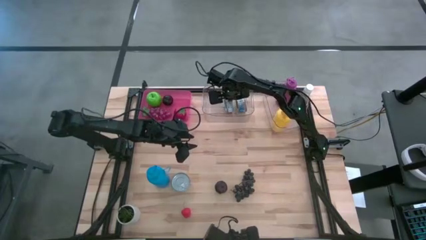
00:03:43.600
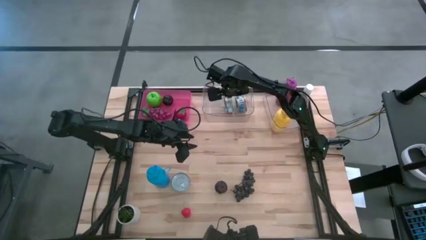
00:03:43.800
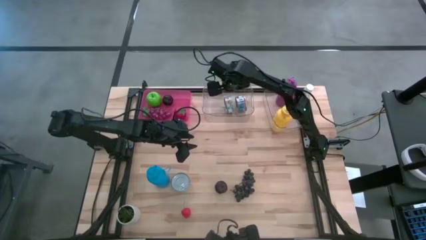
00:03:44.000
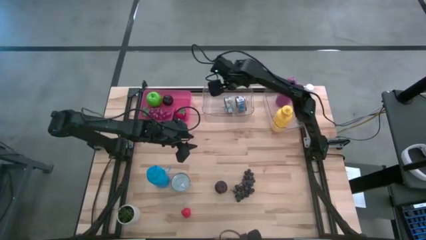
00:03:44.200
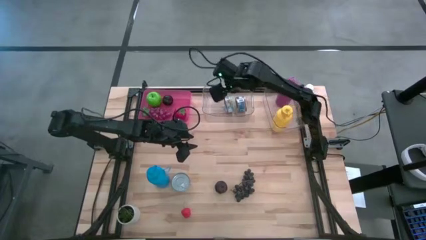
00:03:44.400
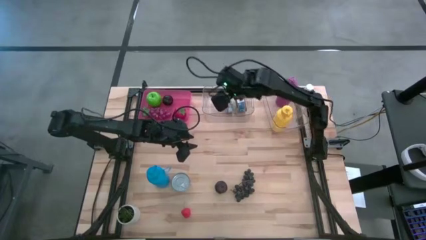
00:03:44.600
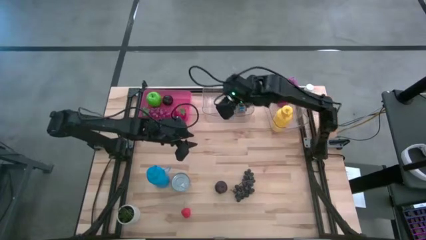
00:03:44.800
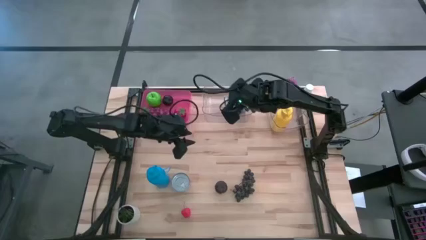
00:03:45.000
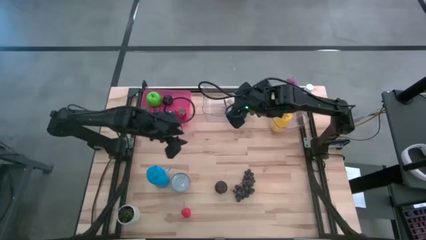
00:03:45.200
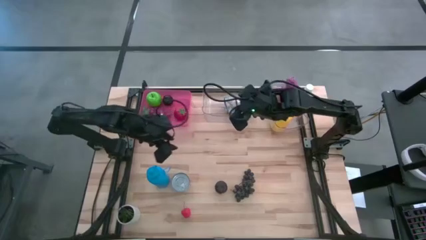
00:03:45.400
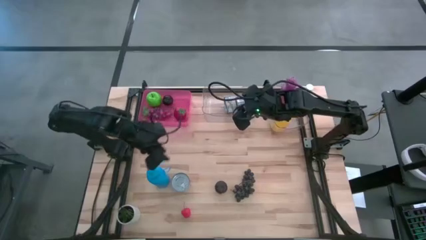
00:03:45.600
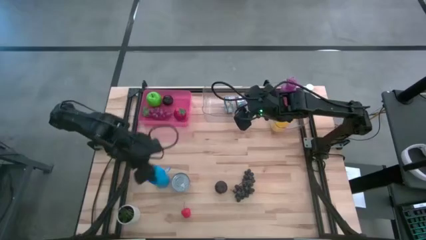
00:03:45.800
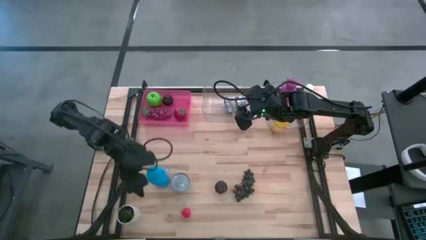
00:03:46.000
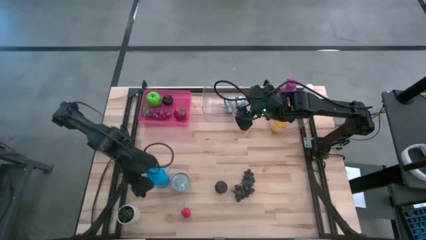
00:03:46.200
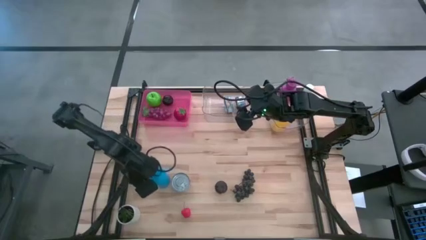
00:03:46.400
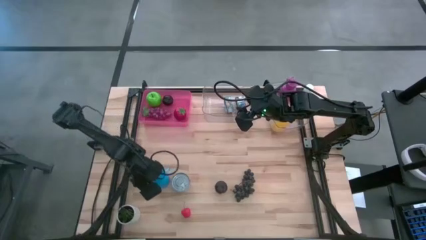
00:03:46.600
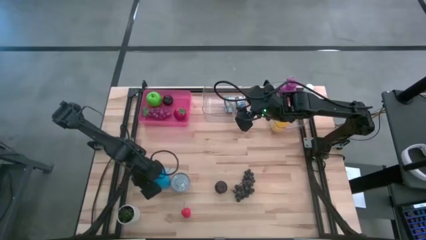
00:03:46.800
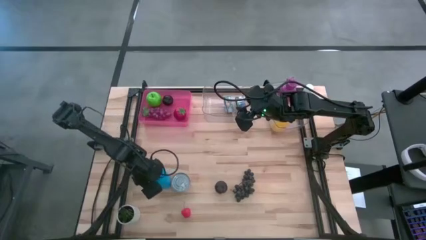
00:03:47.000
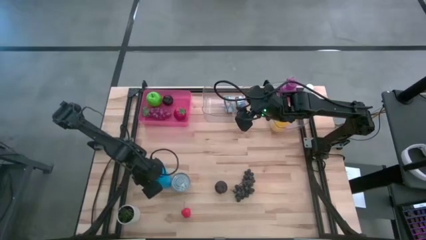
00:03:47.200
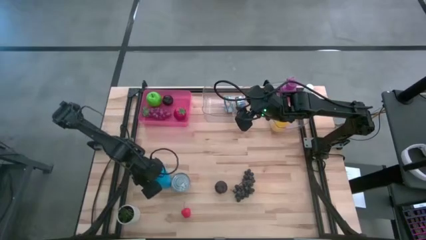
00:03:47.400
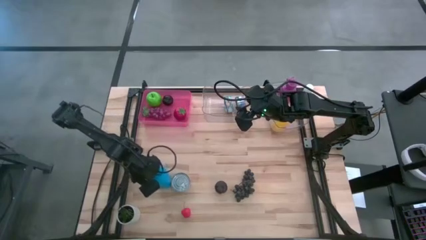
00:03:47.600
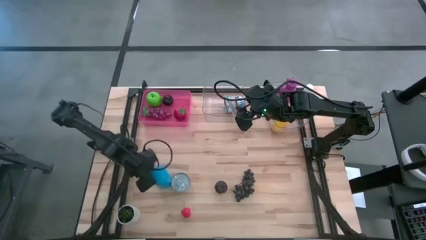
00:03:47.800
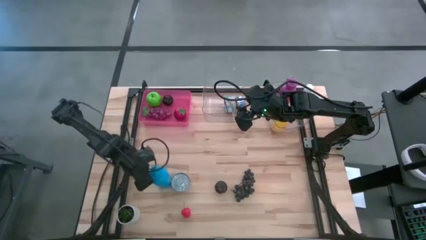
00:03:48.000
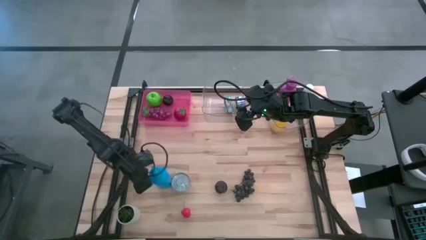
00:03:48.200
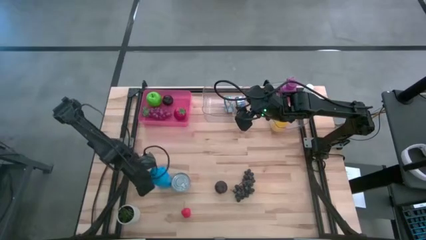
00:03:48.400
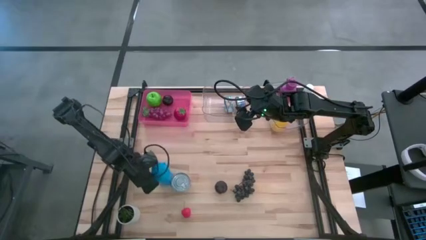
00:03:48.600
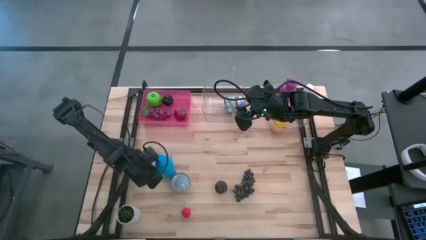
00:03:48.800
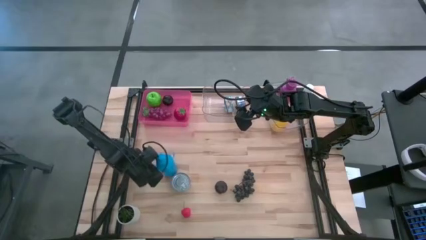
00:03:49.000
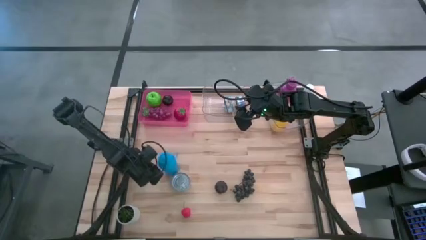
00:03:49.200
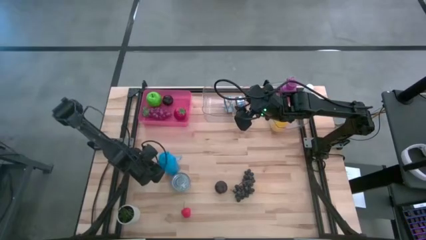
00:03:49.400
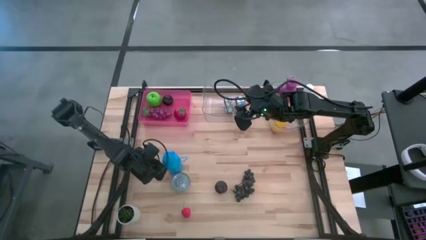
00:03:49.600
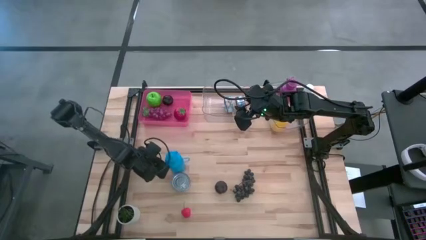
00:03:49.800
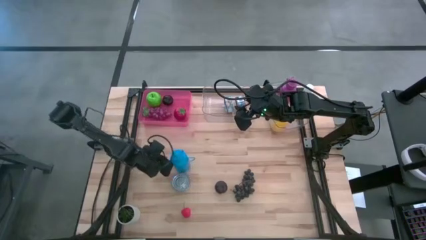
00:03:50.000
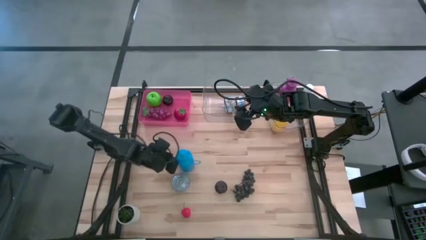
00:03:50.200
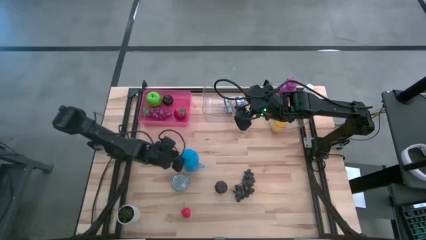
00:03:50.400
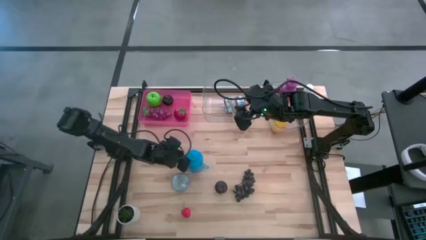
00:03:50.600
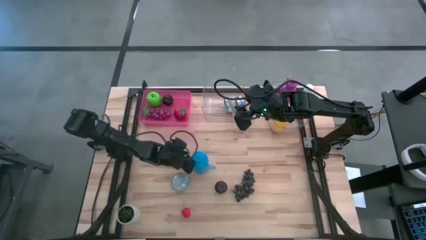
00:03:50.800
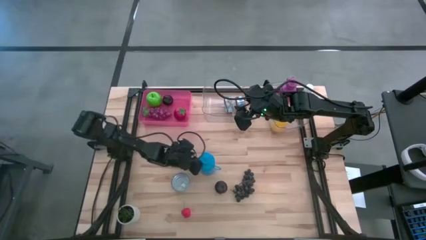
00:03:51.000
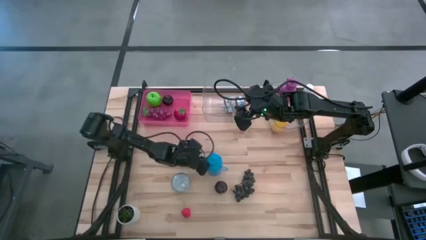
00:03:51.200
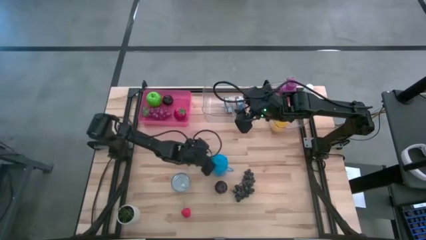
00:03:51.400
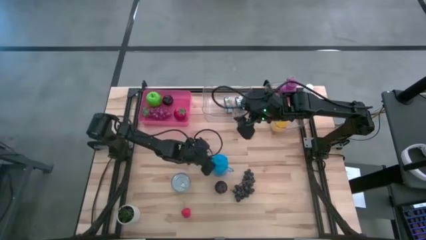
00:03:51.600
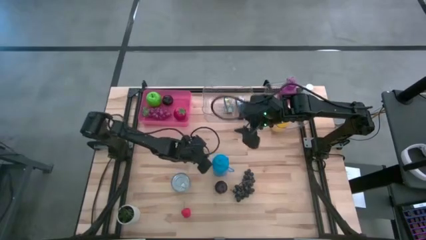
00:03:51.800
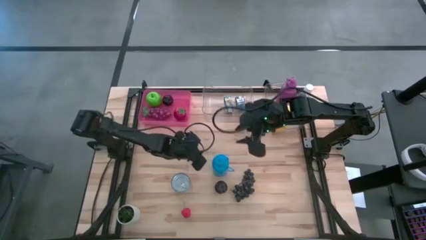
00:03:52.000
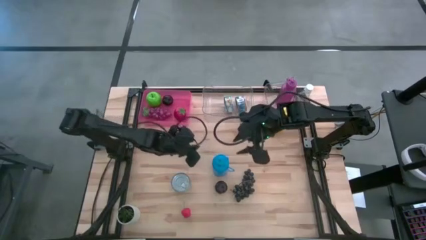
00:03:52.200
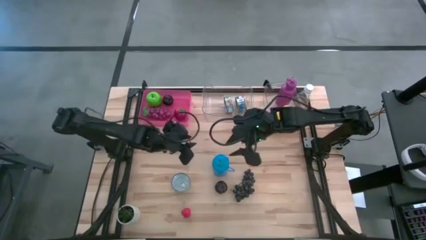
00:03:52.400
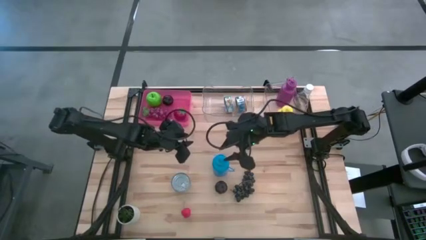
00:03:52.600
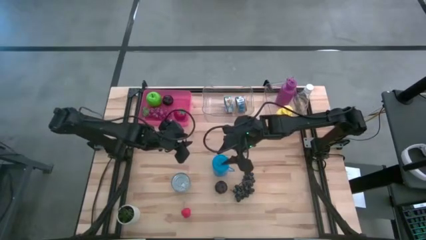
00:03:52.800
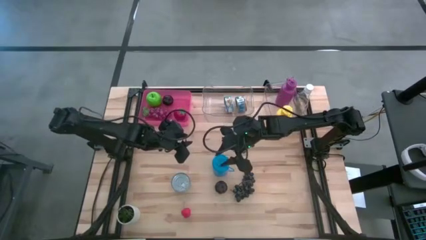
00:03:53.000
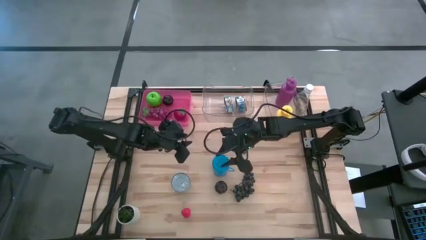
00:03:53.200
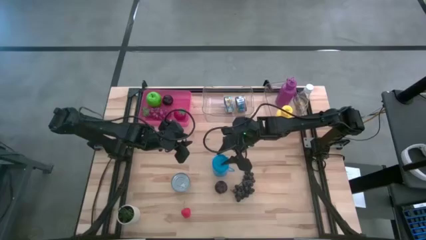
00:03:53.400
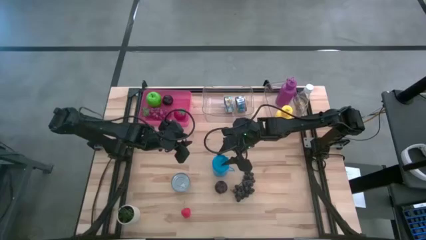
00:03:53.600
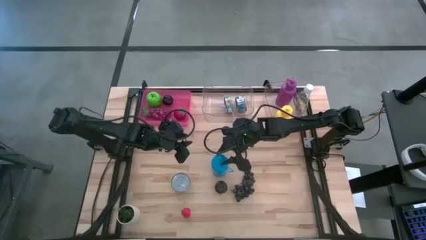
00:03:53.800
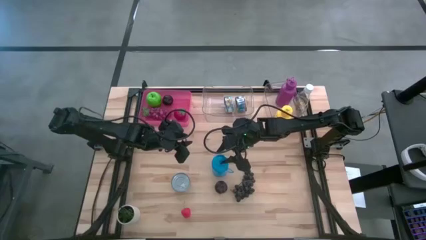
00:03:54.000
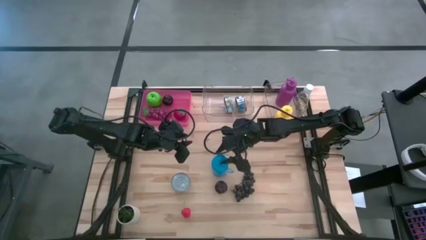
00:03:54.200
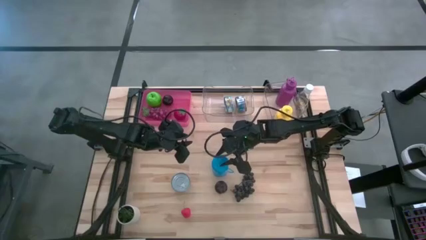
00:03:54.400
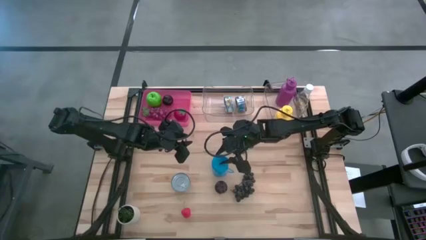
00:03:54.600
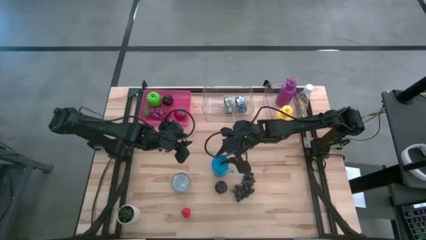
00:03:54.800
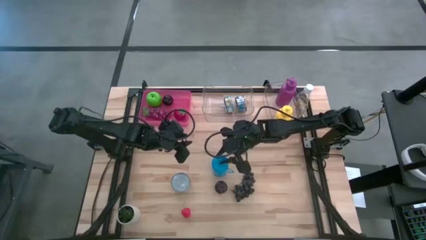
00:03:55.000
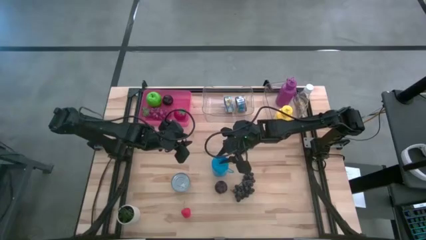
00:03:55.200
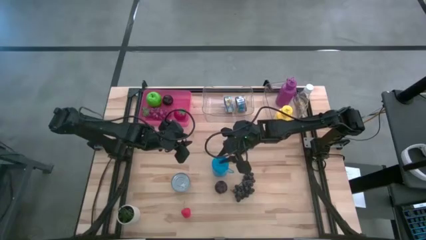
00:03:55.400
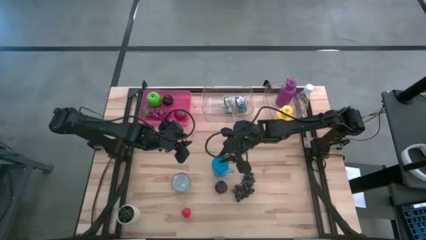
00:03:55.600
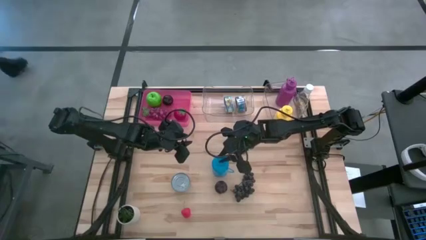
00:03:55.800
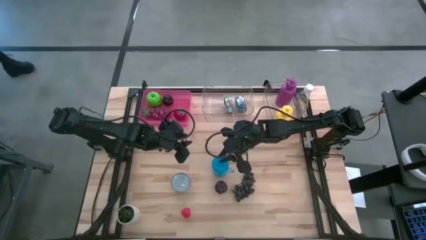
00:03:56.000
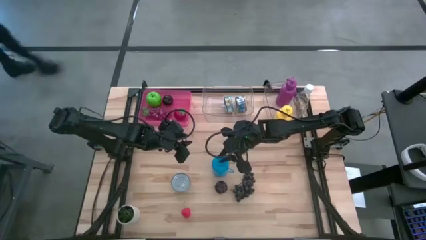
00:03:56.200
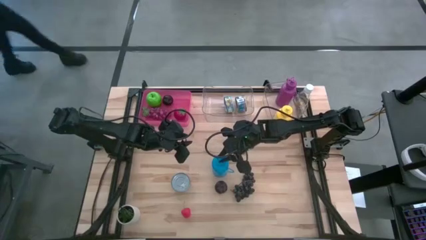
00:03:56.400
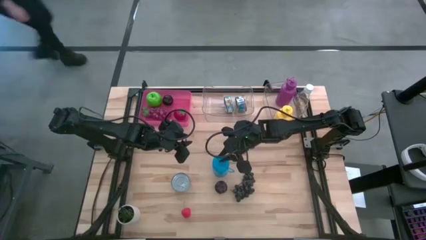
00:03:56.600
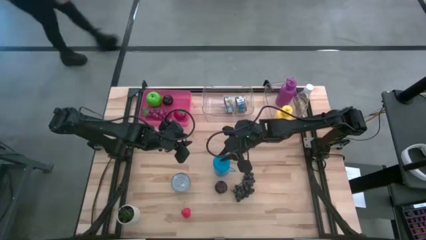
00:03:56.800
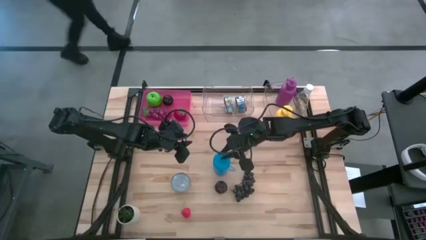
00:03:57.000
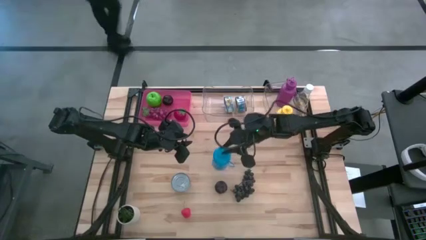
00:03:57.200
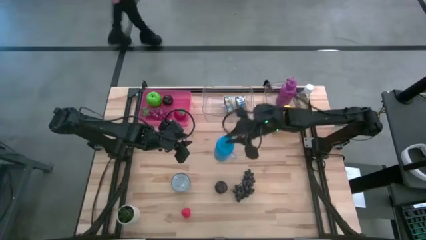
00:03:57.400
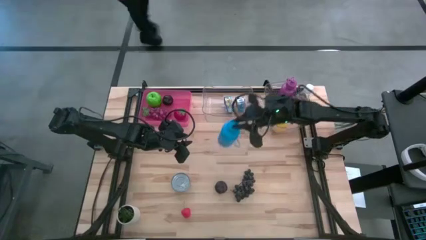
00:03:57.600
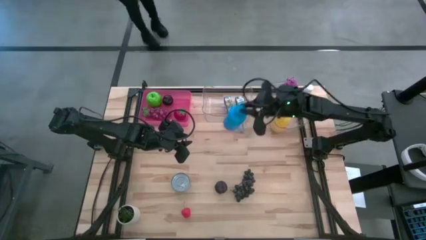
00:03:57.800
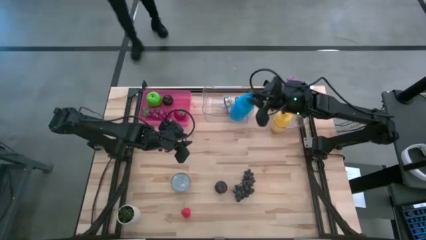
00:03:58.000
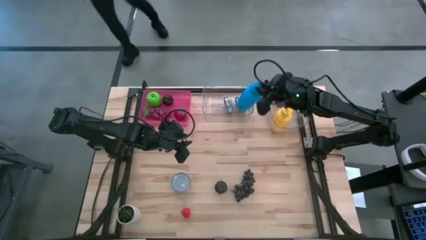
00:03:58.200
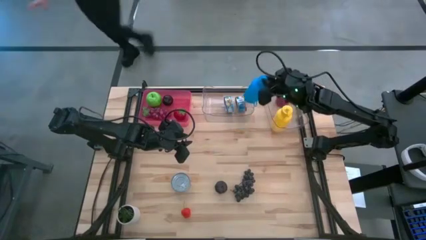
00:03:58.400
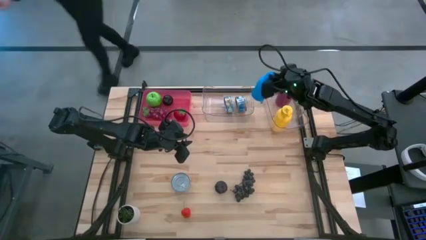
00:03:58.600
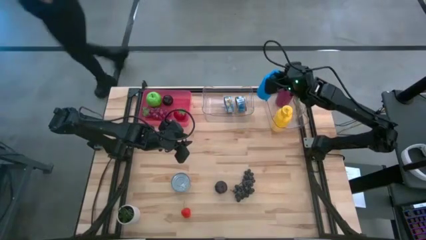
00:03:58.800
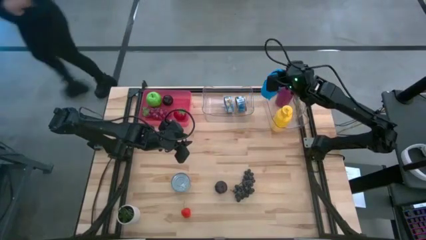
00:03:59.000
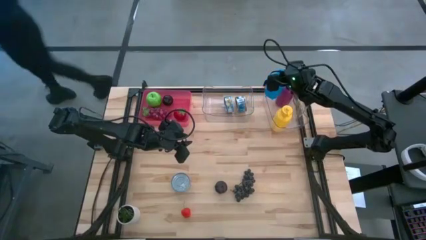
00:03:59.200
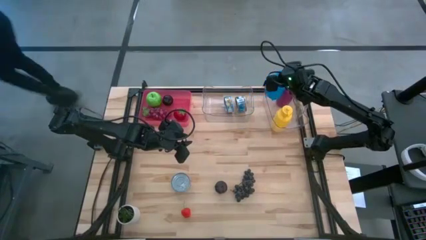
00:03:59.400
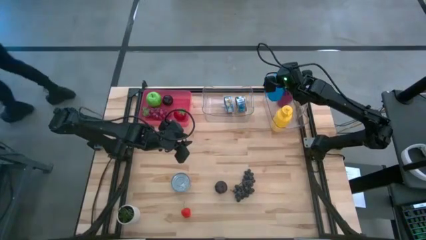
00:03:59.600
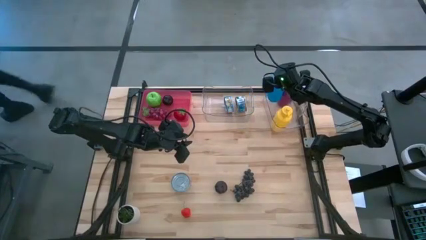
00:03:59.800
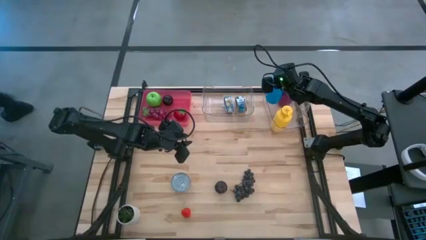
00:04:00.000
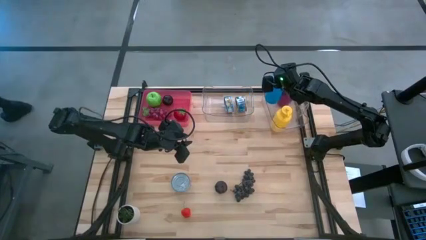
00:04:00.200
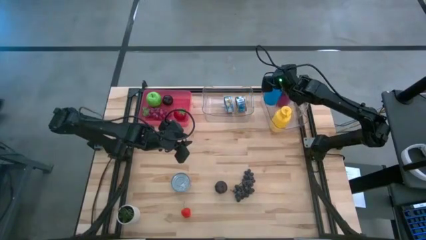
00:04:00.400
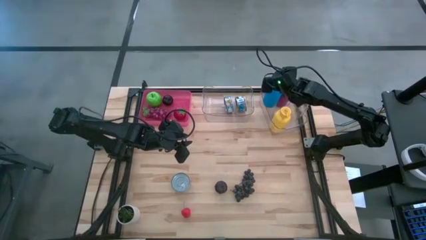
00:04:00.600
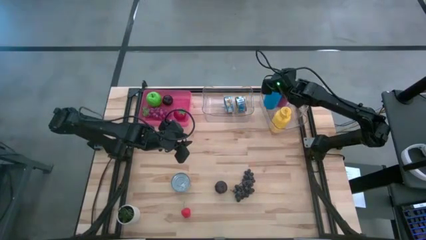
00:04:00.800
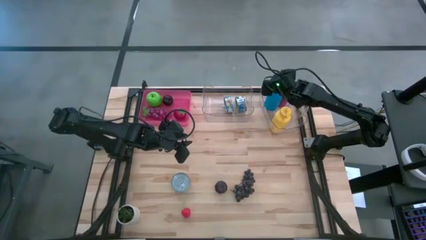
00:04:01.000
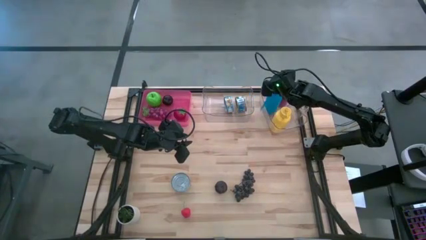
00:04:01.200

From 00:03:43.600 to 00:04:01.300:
Task: Pick & Place Food Item
Put the blue water bottle into the right transparent bin
